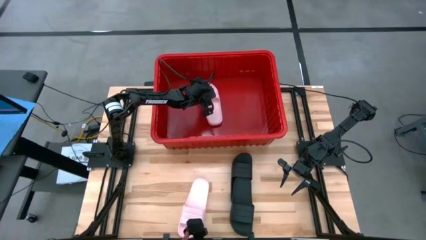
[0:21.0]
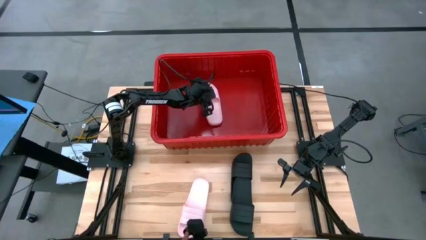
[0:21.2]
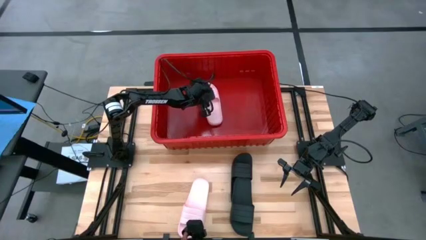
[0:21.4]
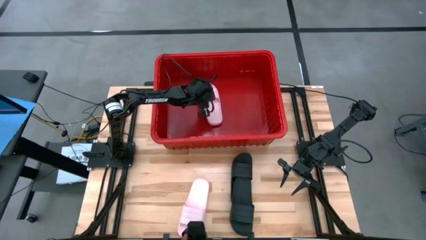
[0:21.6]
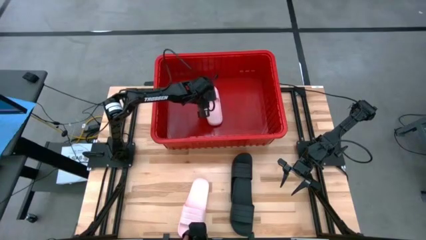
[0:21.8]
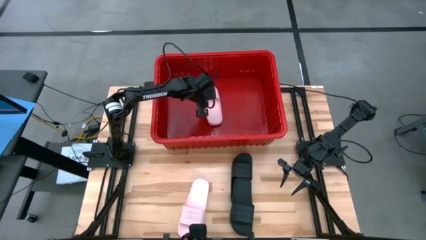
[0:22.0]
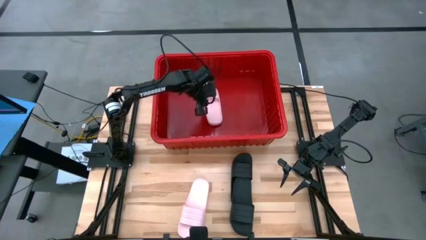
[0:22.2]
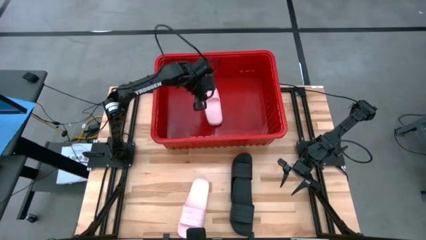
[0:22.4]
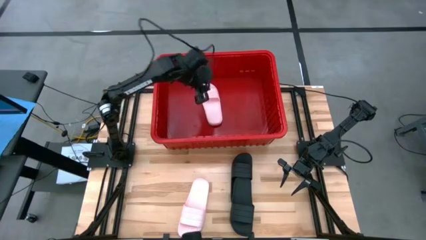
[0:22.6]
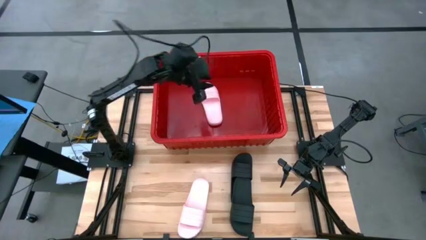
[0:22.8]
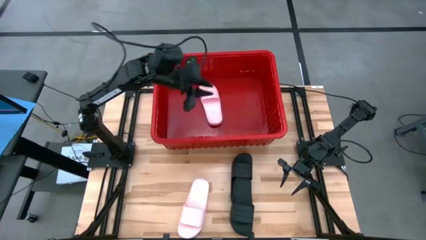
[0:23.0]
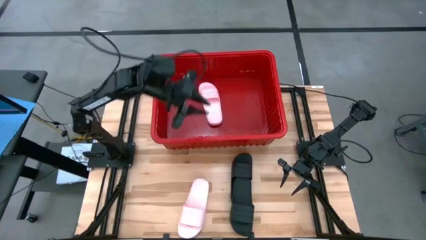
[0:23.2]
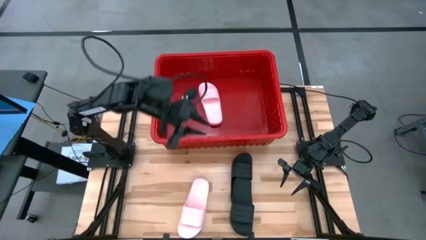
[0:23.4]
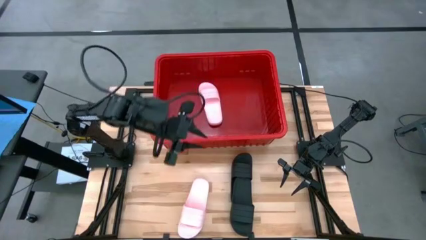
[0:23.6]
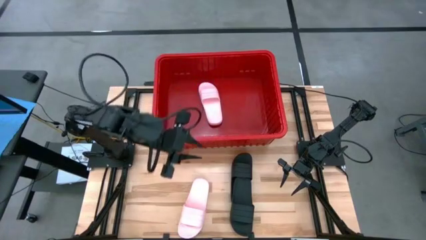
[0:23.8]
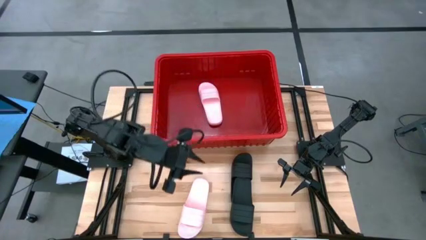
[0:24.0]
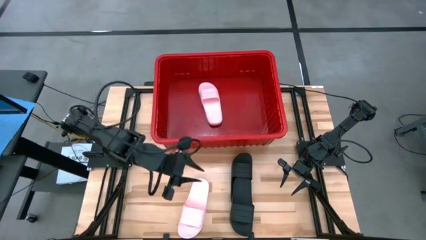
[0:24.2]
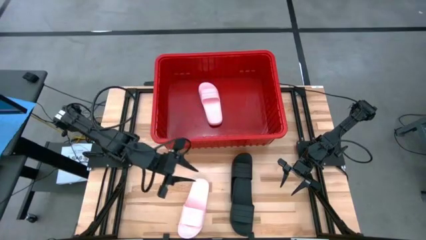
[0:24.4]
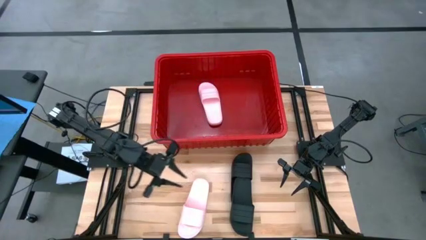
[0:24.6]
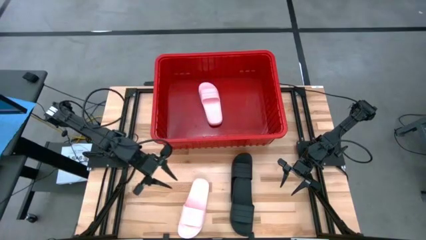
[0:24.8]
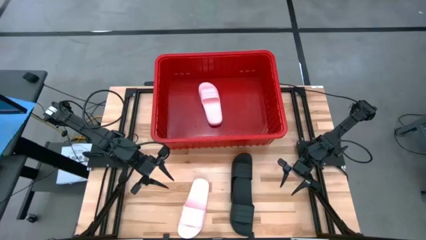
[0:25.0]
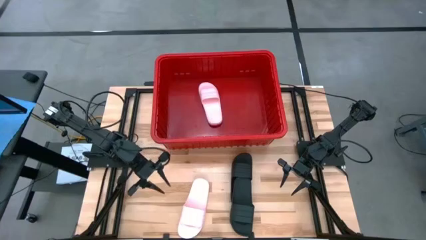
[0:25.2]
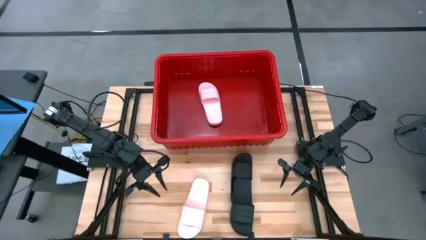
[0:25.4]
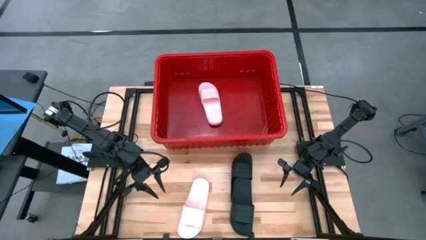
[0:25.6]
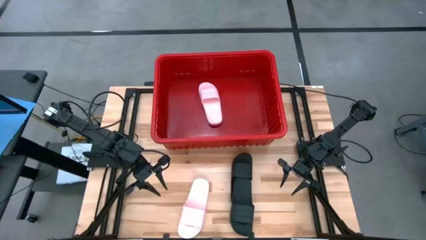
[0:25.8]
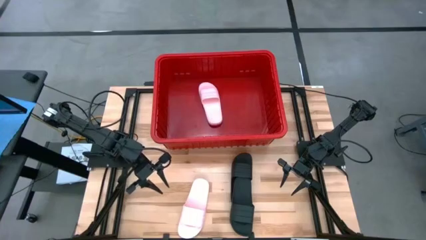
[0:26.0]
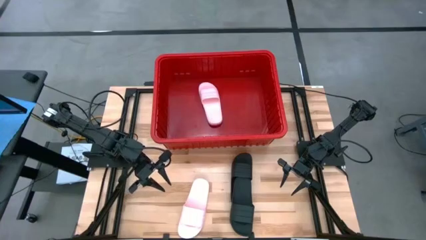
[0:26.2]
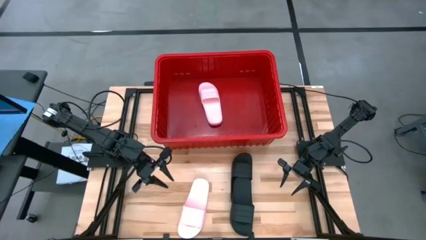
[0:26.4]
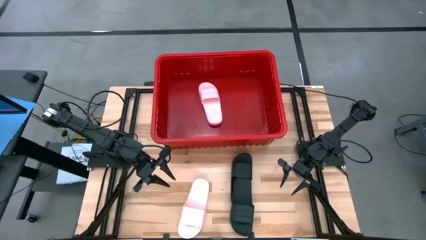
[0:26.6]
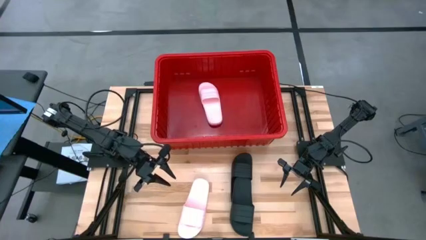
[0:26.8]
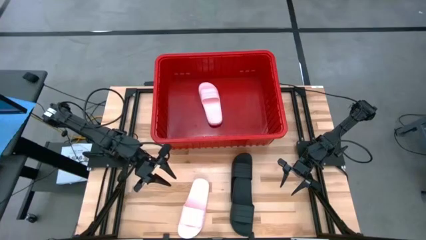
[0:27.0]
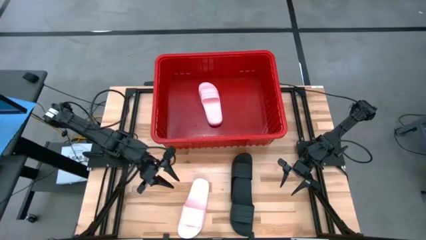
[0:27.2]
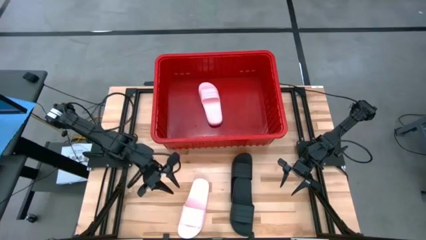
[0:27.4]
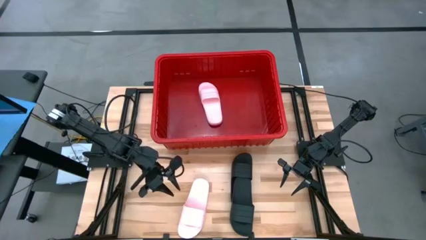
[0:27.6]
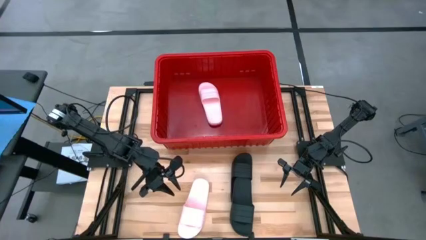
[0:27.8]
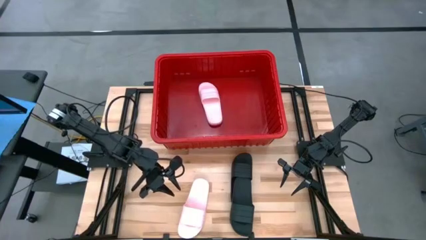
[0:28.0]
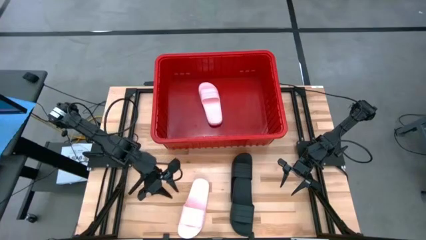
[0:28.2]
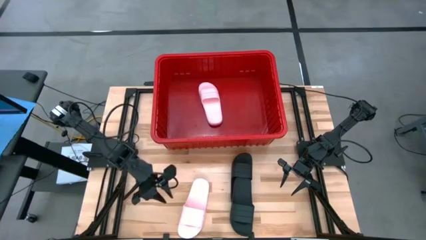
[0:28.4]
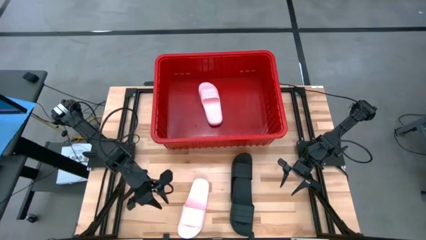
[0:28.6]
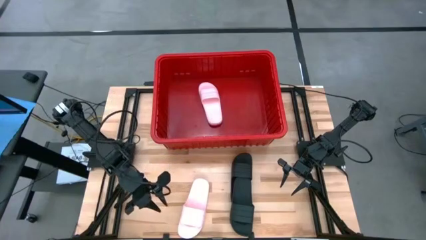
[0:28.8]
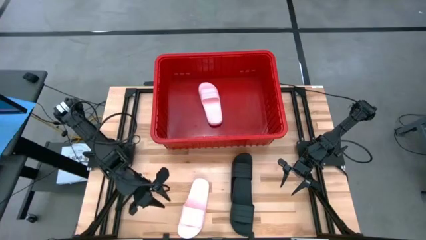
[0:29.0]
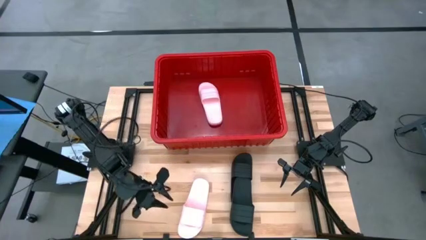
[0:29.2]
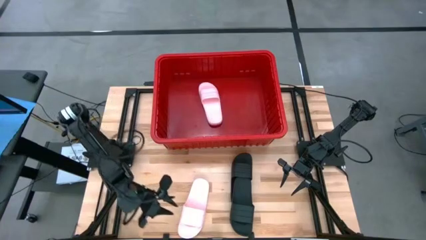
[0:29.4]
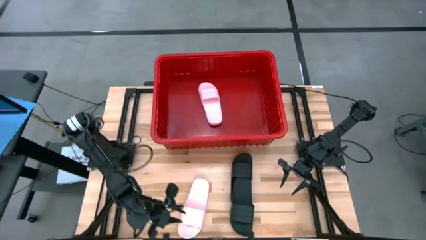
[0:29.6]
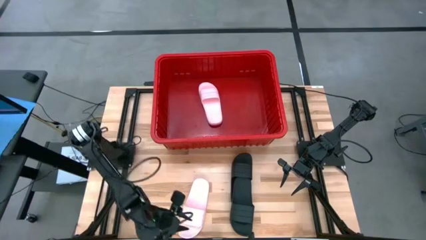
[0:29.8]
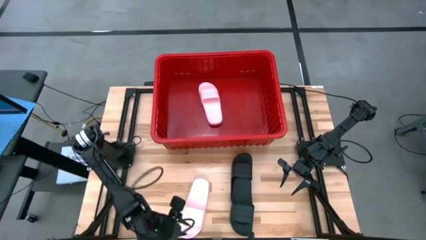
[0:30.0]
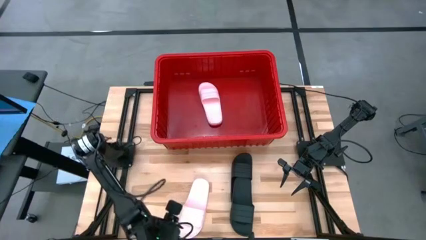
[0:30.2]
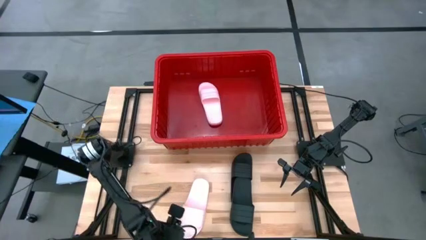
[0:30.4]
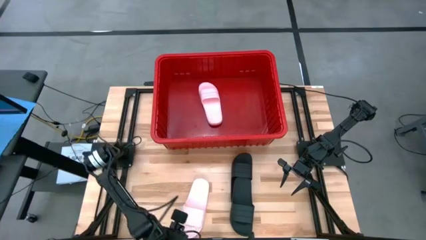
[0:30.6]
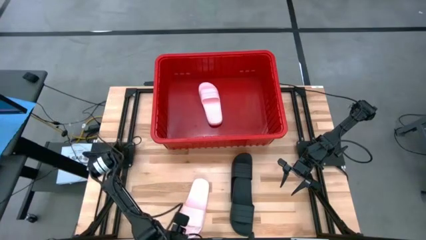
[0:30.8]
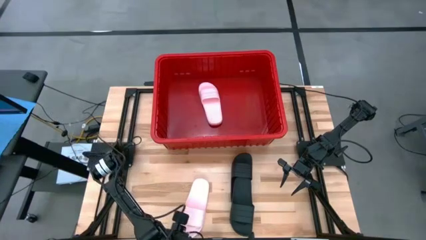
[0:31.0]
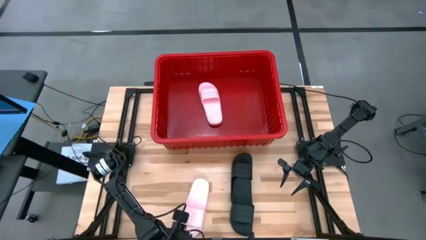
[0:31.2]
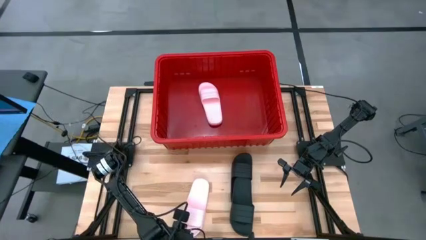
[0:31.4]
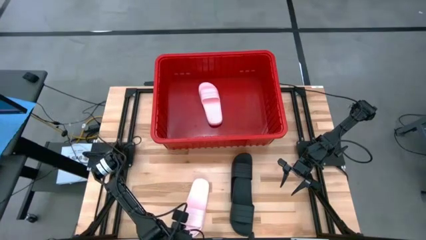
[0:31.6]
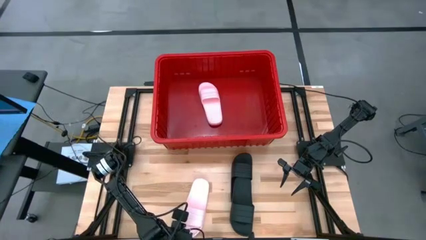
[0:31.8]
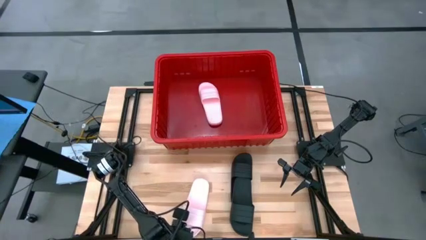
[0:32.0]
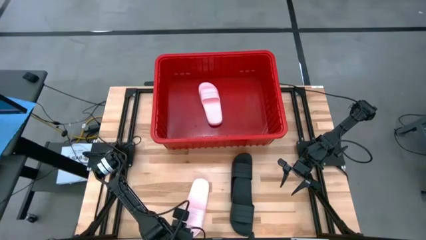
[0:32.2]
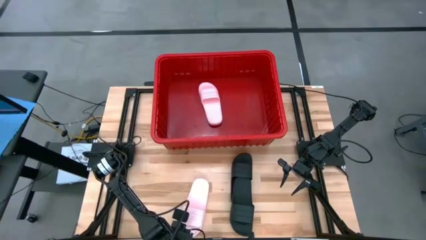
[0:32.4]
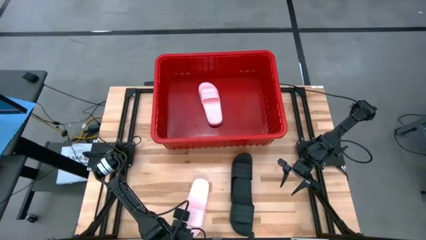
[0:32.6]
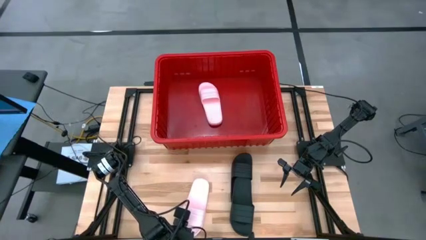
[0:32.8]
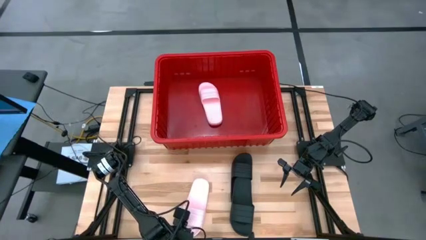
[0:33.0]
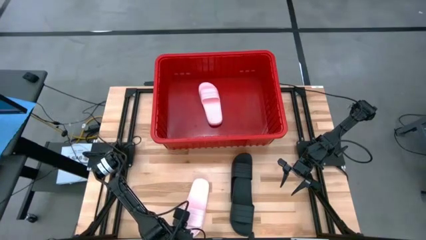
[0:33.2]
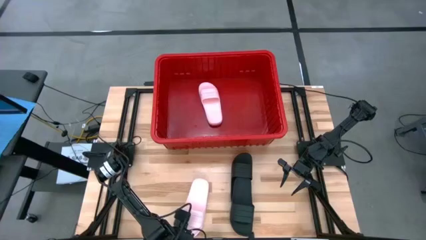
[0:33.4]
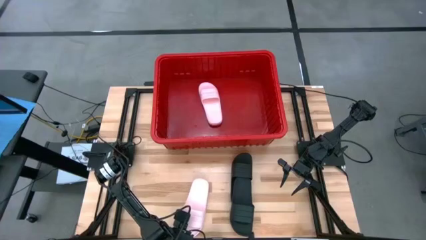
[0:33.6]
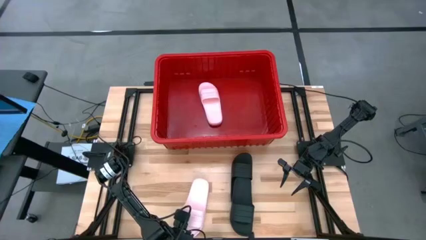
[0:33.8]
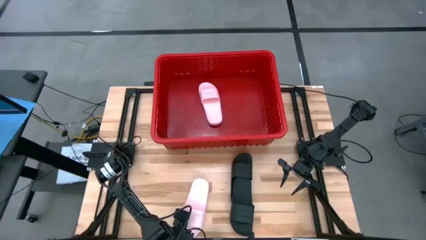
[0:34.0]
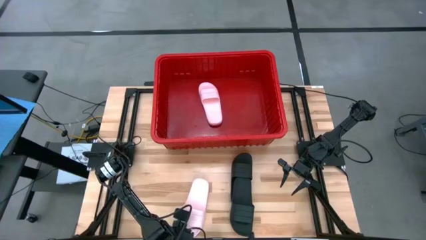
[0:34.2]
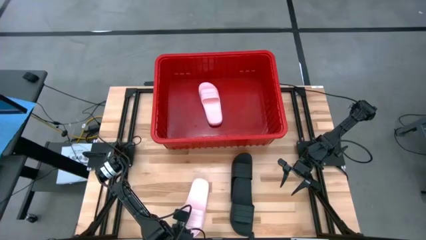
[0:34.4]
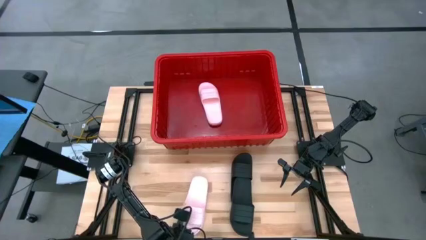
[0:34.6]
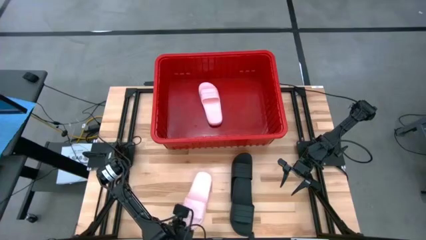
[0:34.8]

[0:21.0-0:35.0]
Task: Pick and place slides into bin
Put the pink slipper in the red bin
